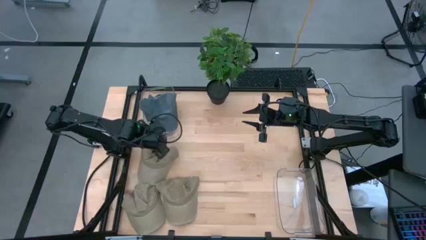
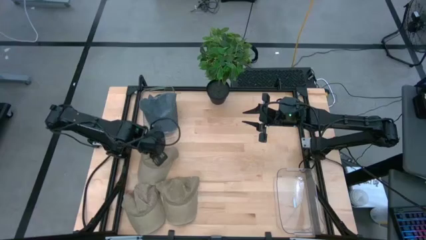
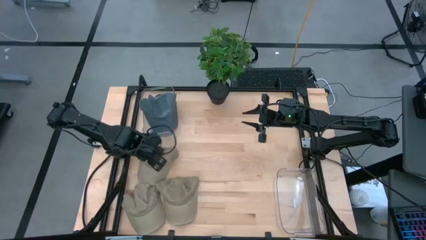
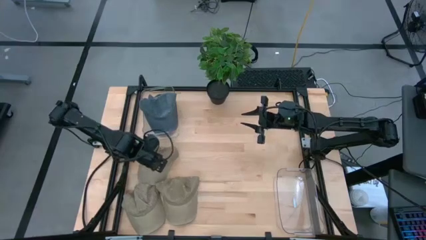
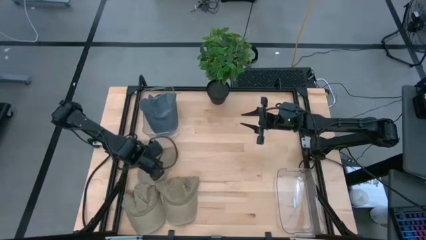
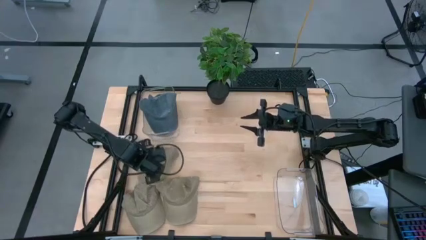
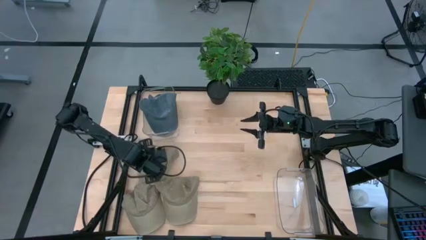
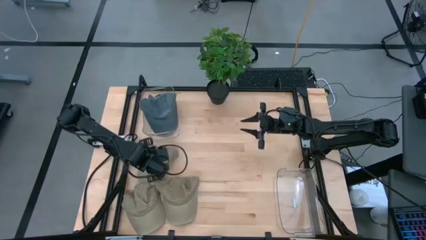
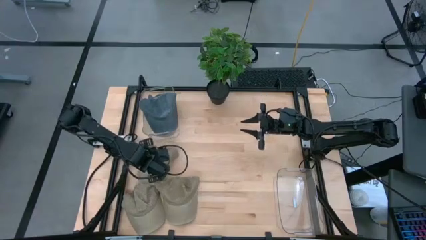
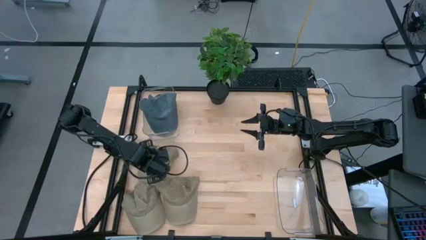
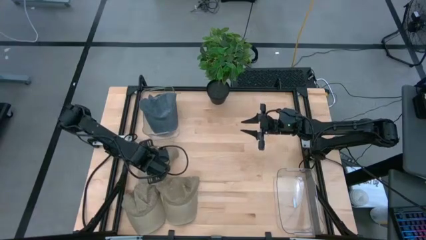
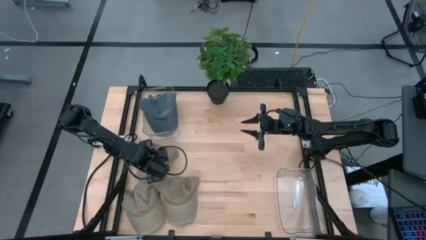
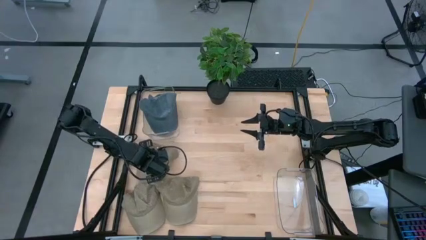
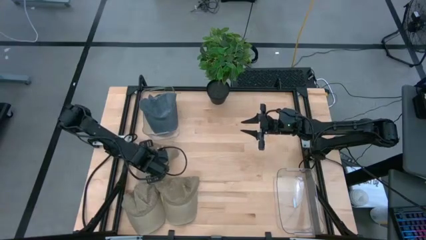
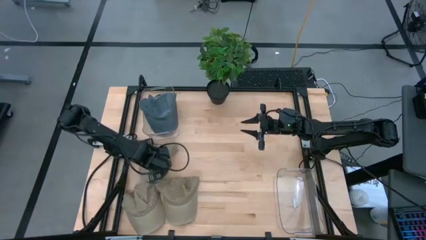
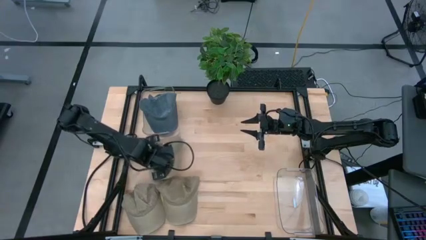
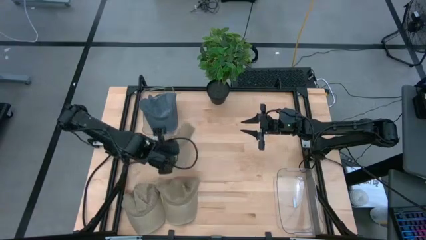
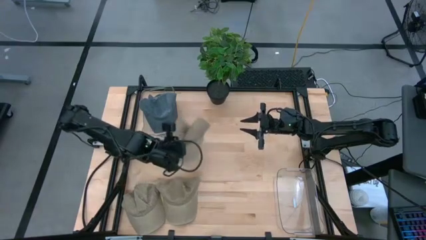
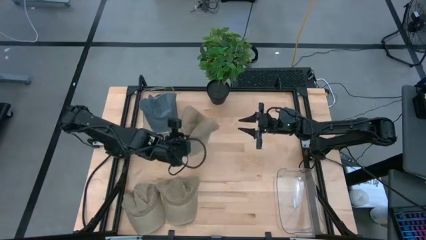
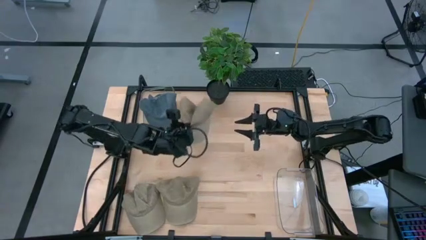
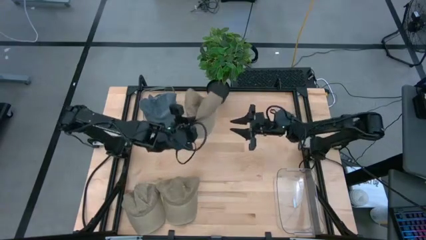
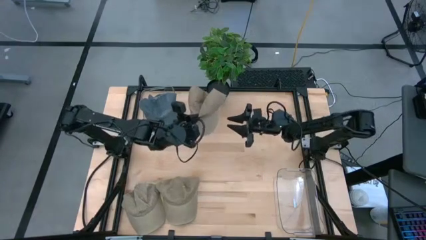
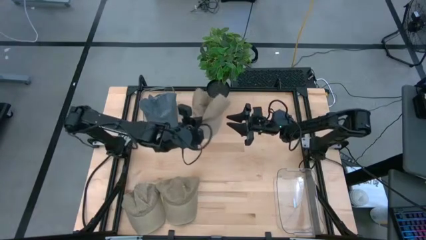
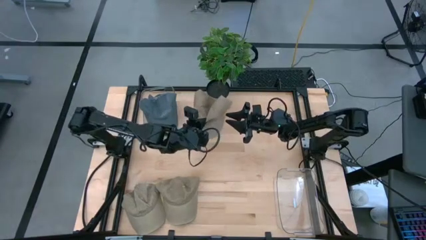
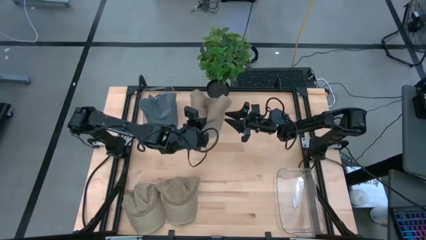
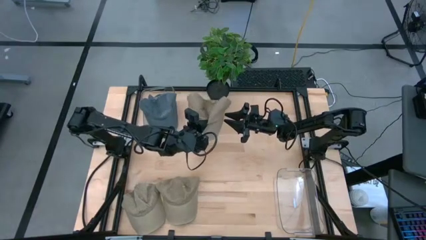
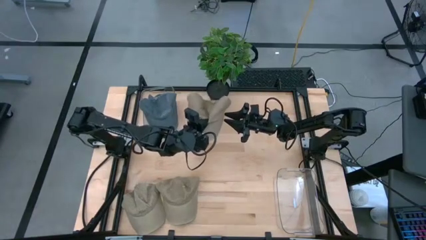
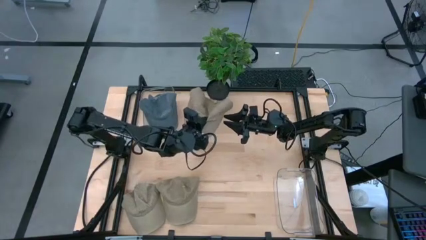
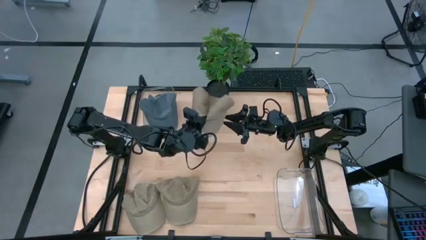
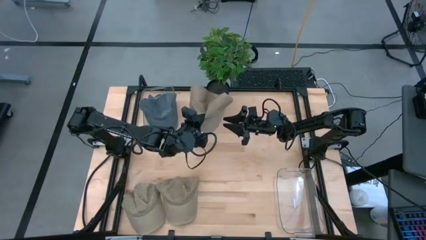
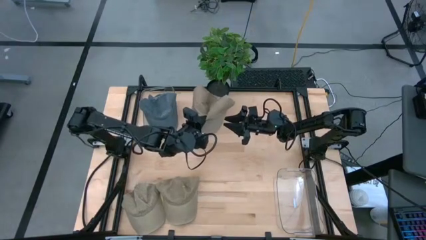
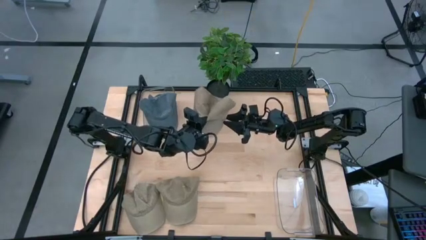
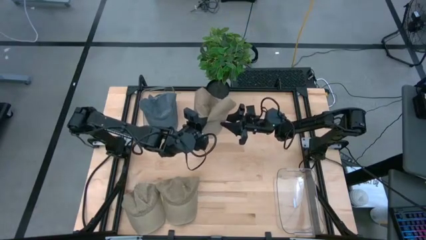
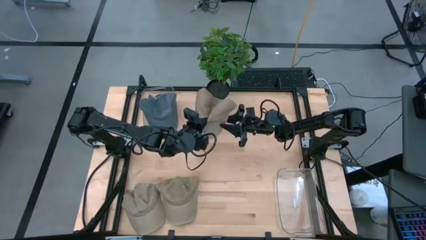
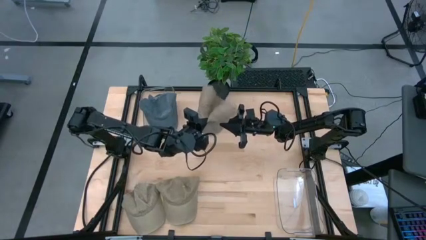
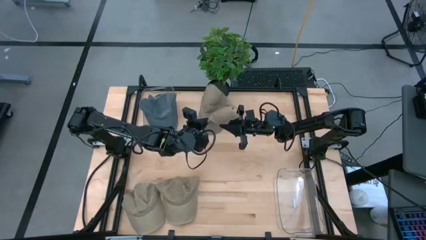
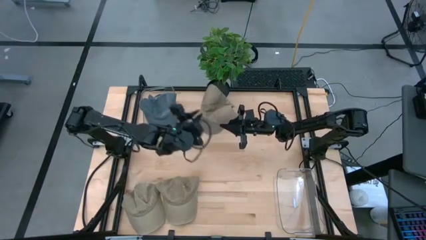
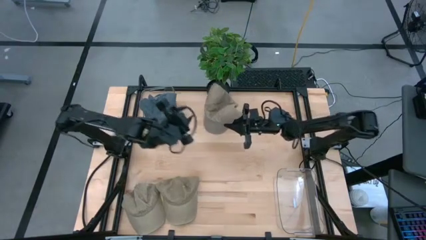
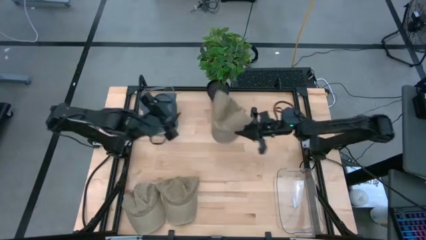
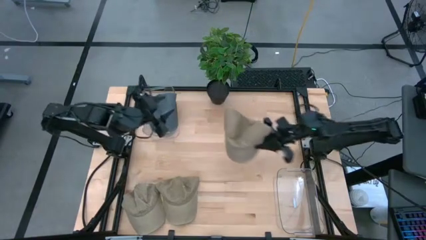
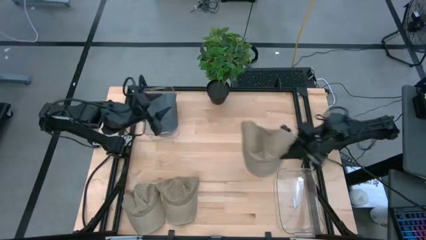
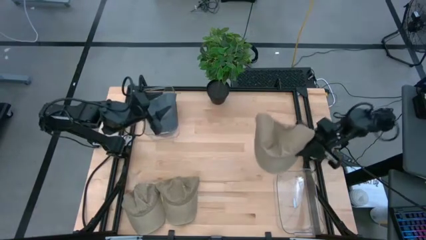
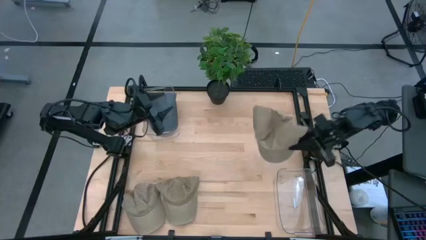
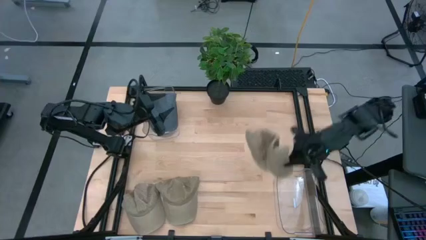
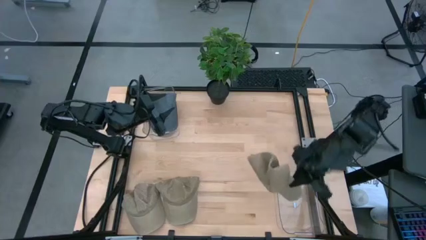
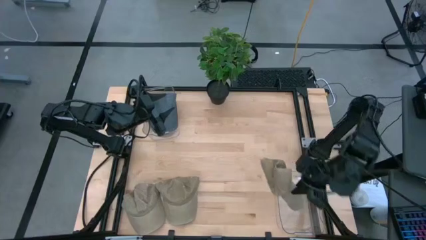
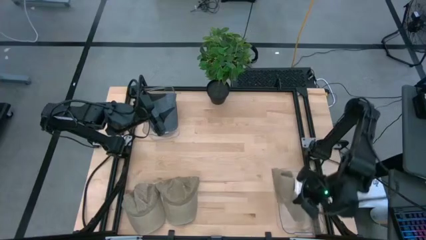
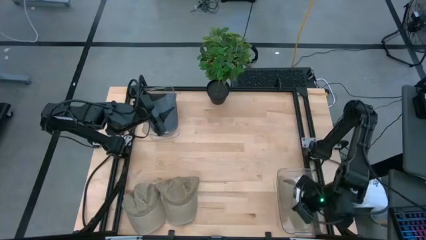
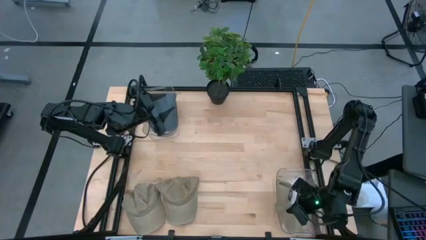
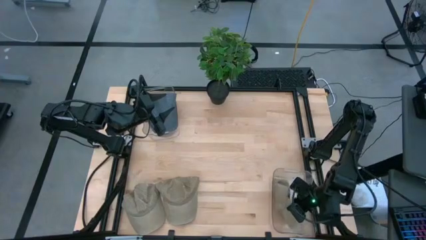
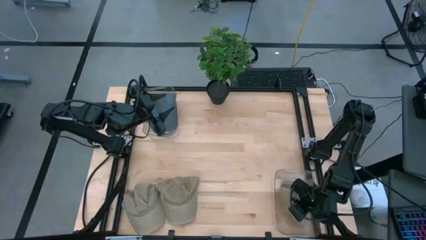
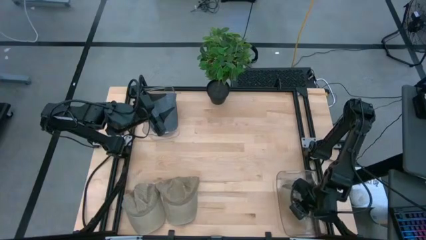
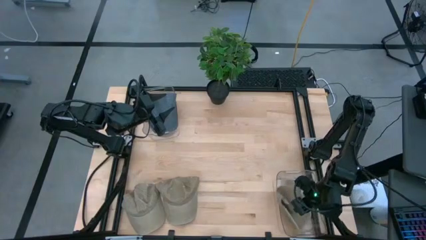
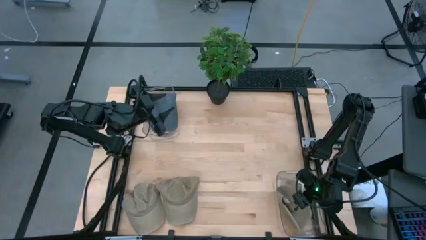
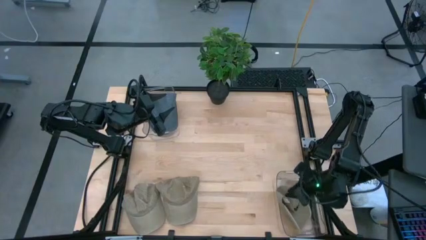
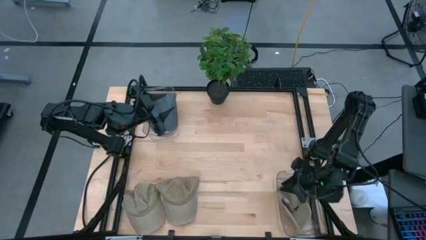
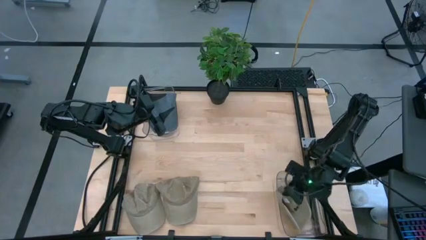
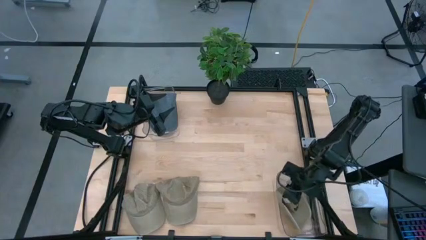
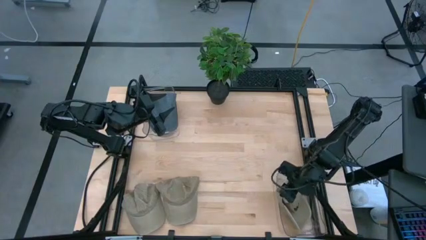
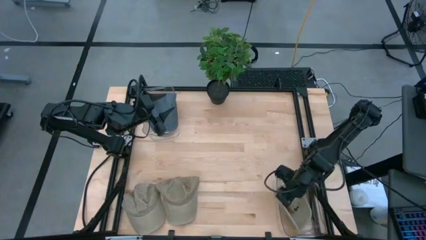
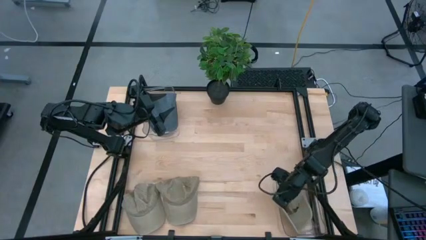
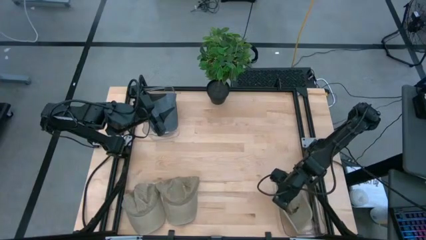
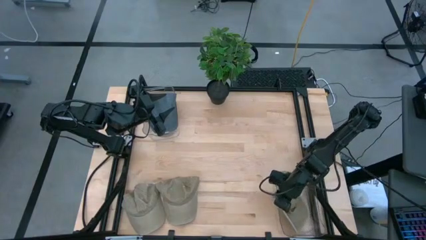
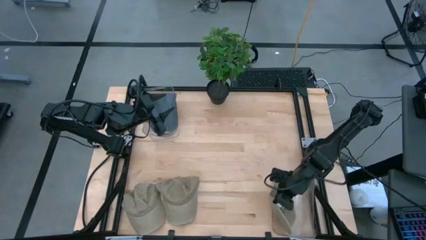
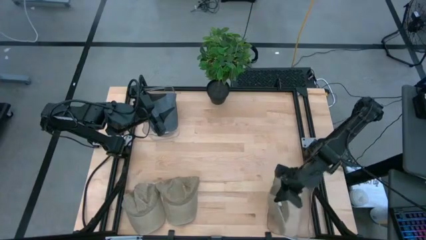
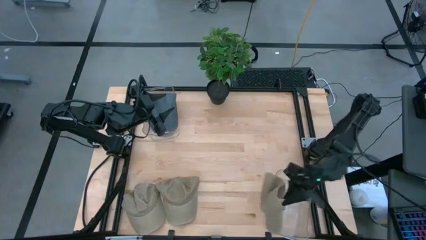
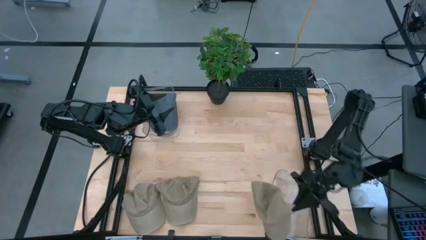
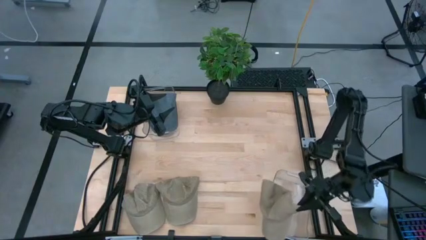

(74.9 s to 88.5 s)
Task: Pick & Place hat
Put the top left brown cap into the right transparent bin

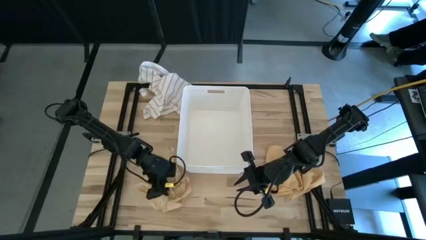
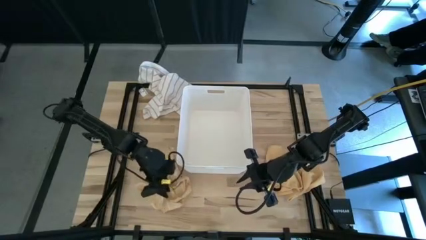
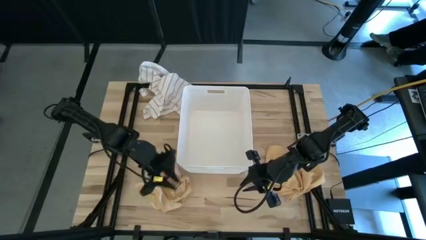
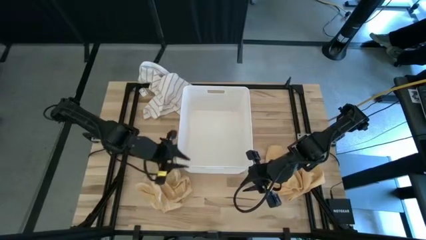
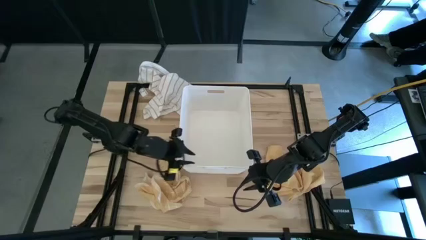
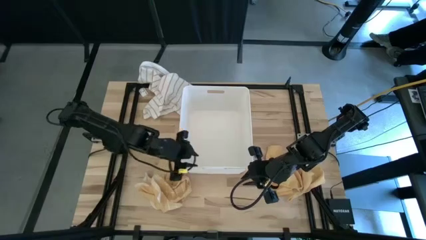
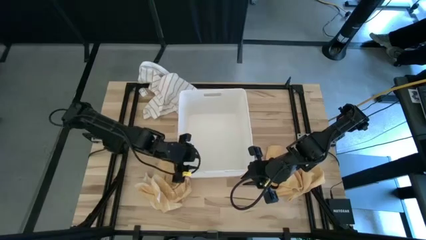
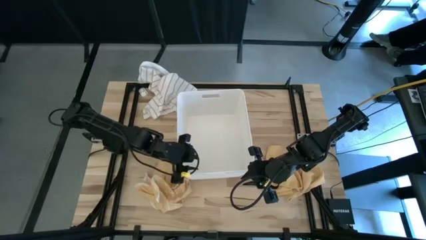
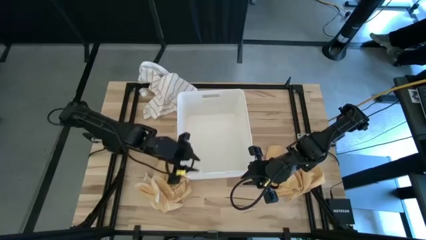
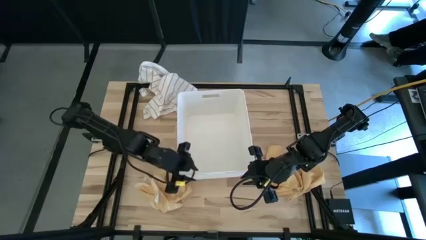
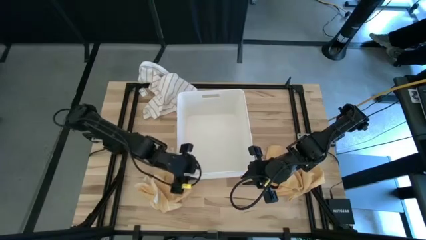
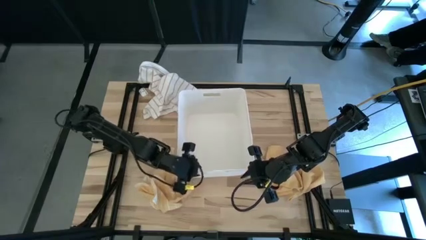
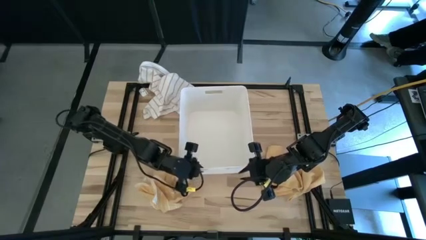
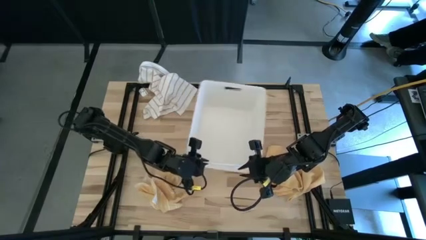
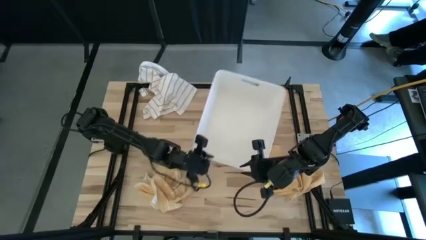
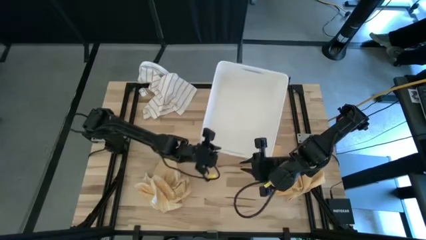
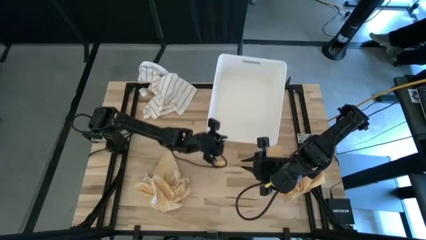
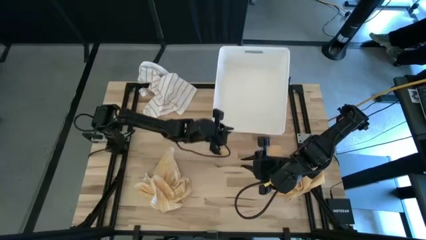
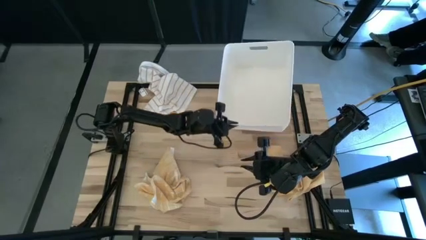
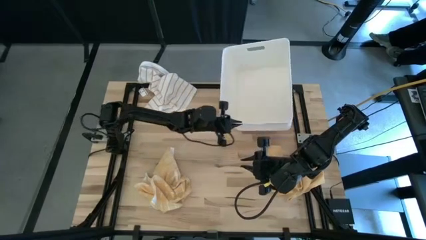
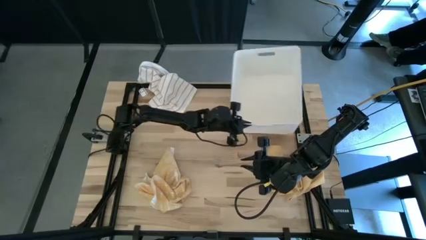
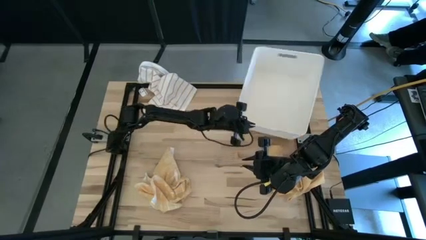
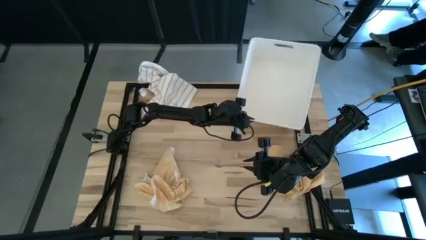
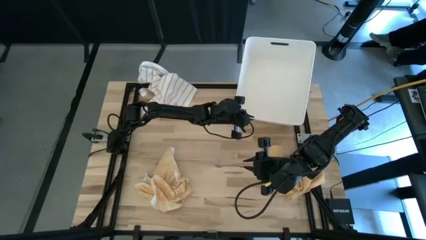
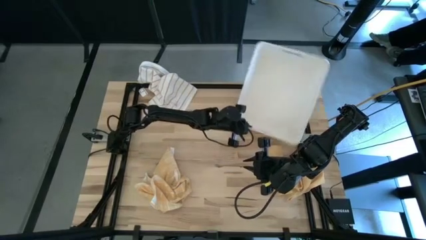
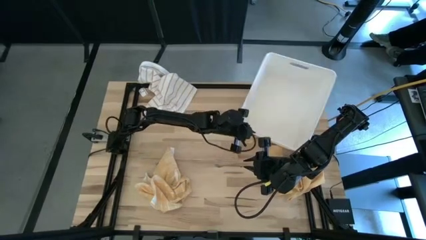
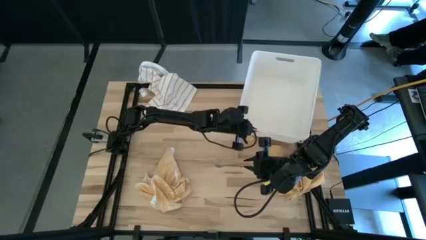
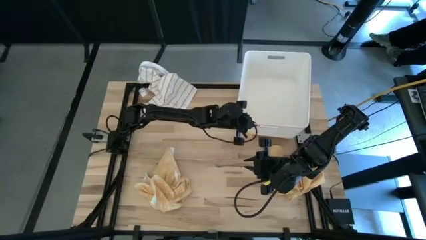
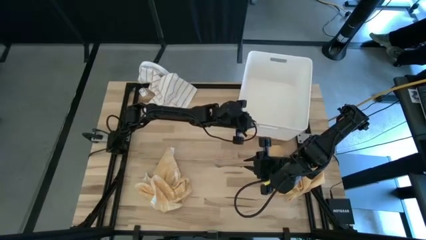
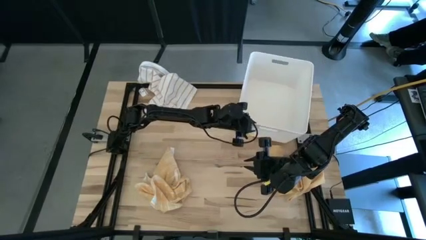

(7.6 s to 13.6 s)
Task: Fold towel
Move the white laundry organizer to the top of the table
